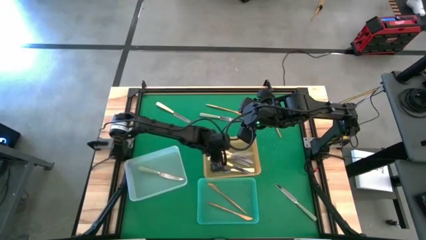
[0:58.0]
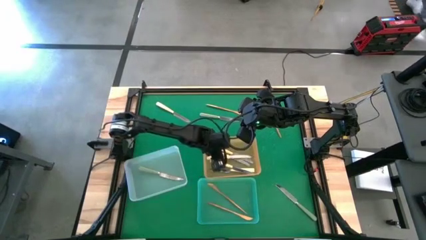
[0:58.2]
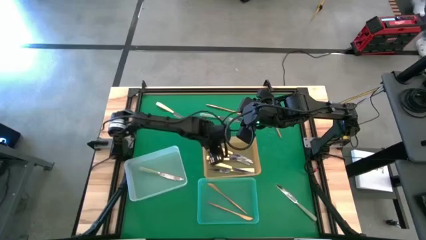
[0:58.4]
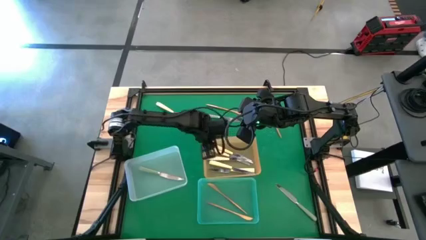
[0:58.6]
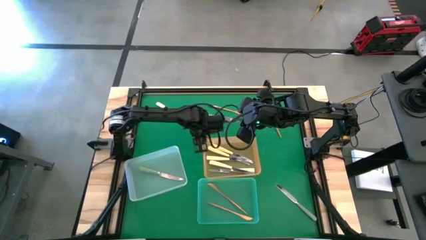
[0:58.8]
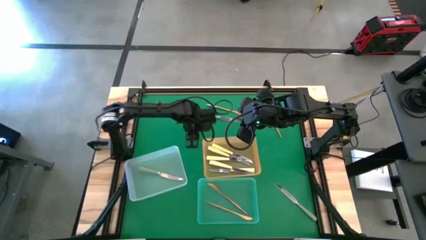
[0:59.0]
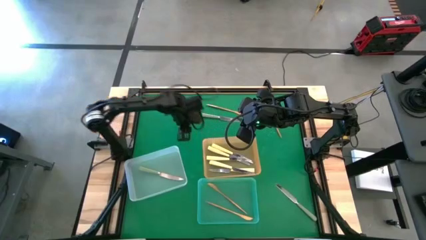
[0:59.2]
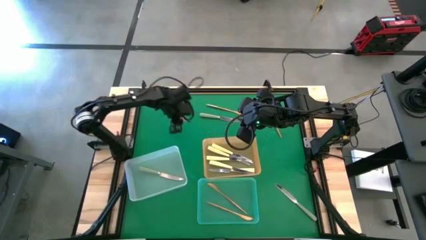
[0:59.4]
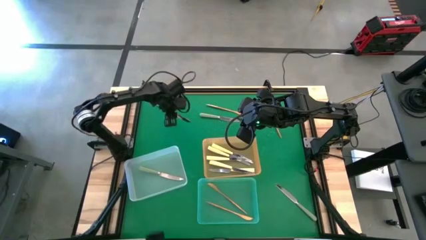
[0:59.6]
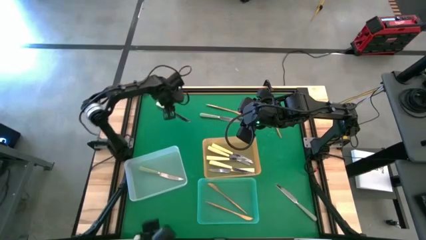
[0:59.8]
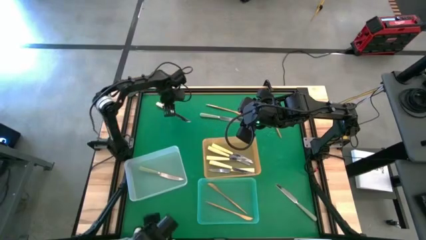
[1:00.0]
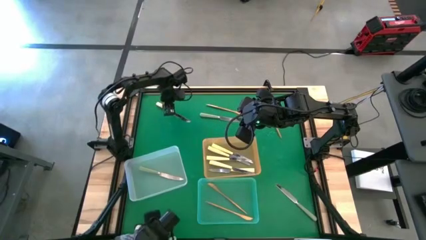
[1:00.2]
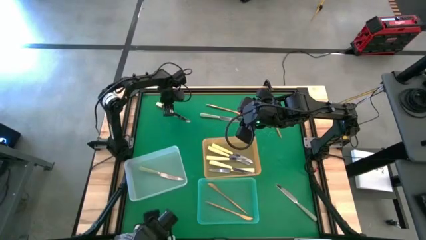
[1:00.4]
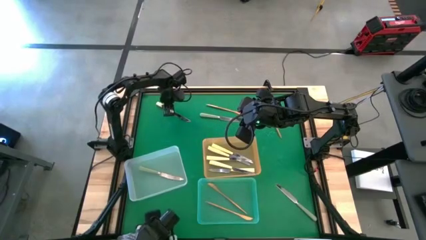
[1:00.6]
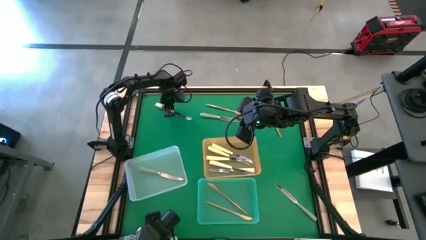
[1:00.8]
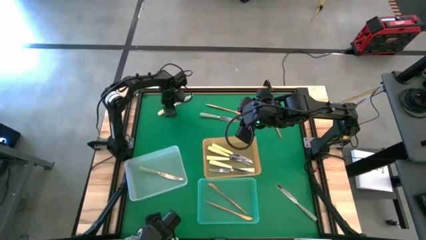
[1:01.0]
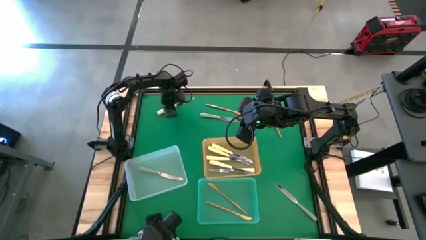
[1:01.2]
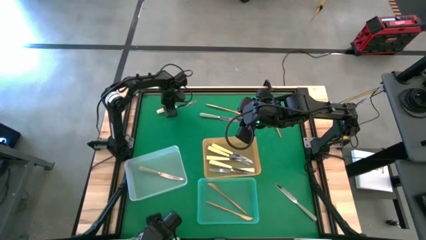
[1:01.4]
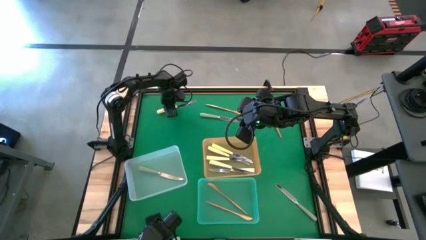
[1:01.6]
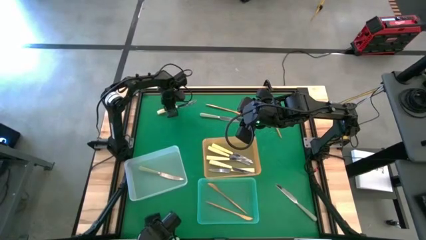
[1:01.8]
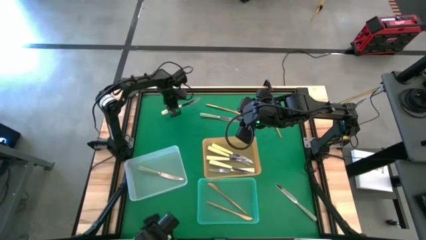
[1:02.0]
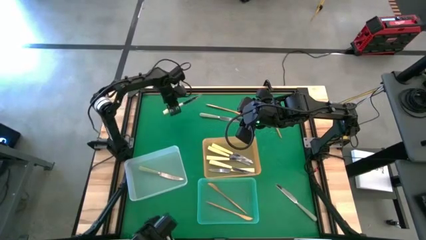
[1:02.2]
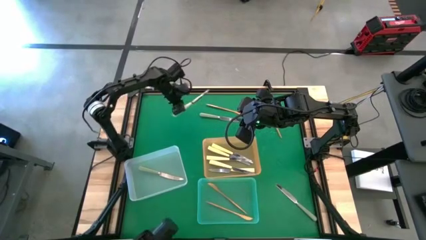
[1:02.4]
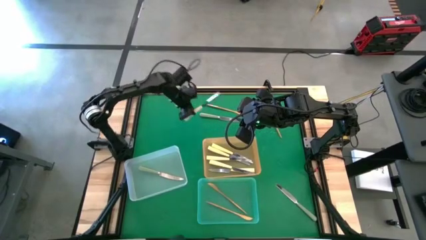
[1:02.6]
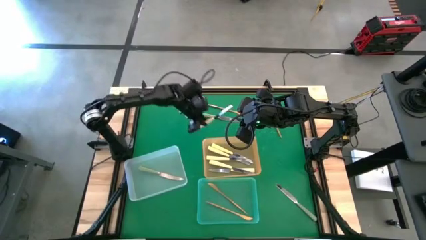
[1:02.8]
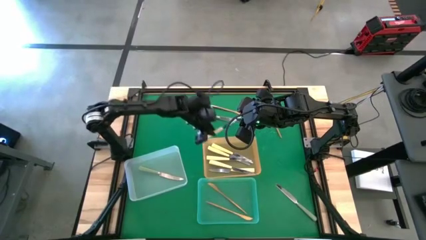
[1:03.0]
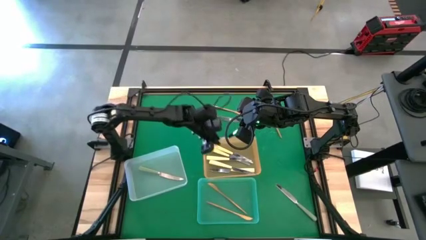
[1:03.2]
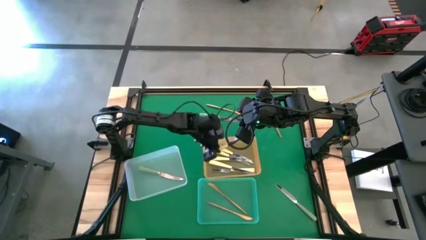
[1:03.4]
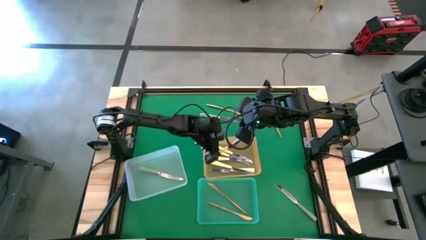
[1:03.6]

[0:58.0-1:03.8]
Task: Sort silverware by color (type)
Put the yellow table knife into the orange bin

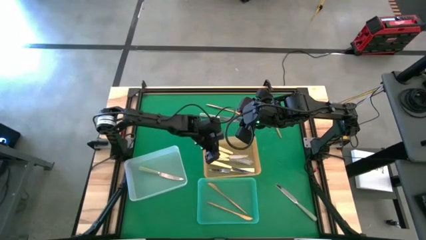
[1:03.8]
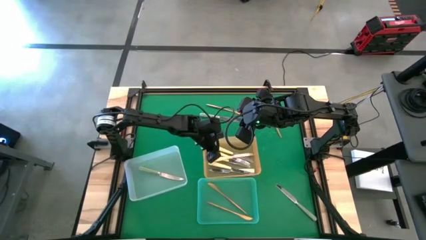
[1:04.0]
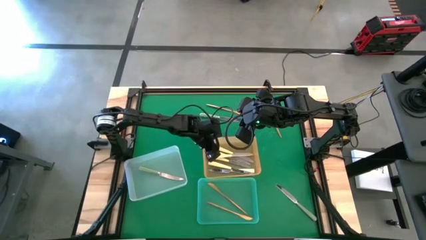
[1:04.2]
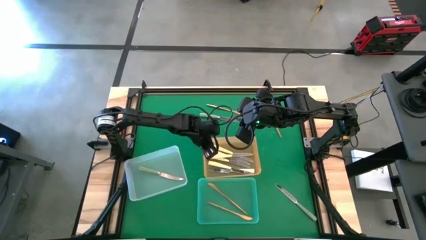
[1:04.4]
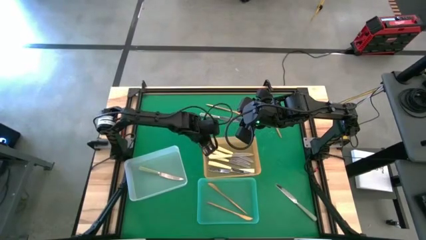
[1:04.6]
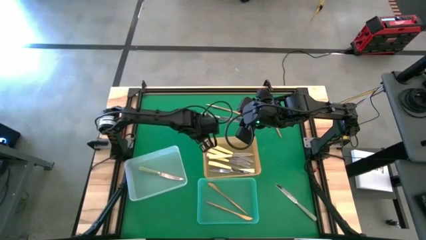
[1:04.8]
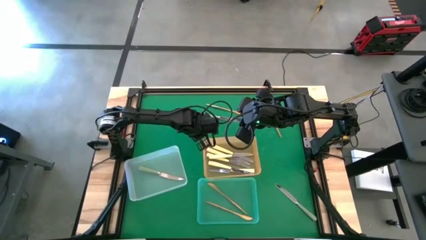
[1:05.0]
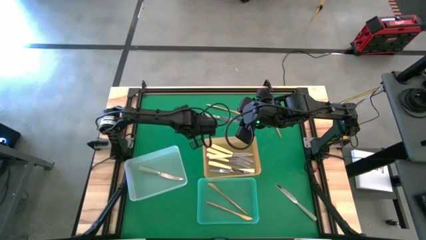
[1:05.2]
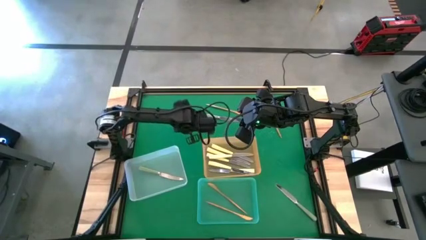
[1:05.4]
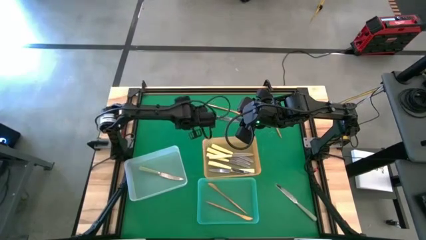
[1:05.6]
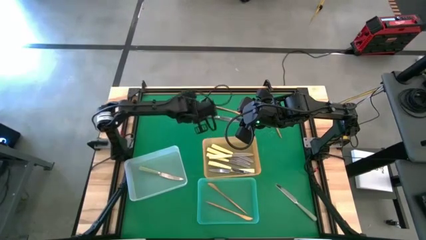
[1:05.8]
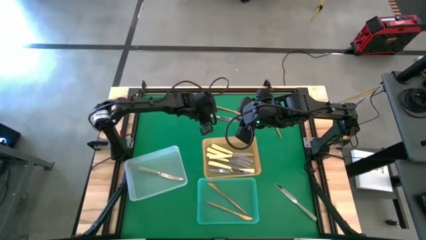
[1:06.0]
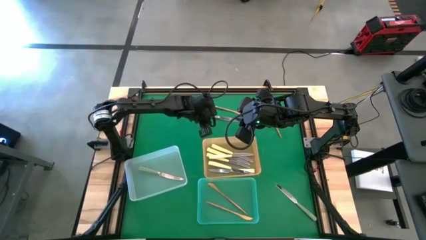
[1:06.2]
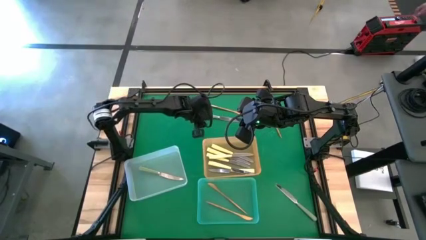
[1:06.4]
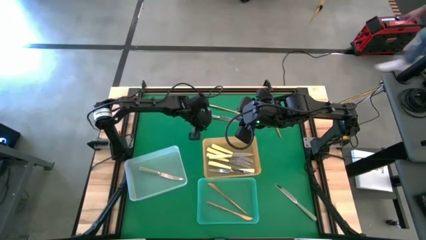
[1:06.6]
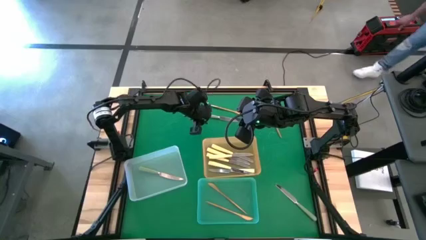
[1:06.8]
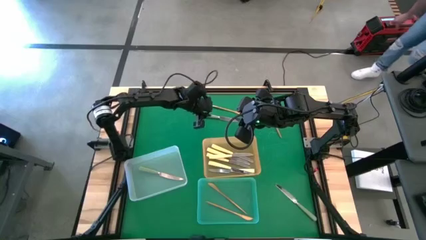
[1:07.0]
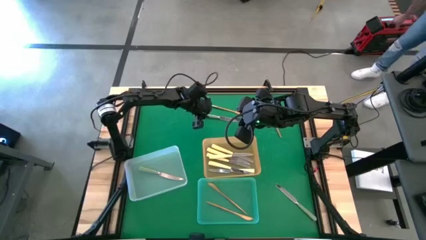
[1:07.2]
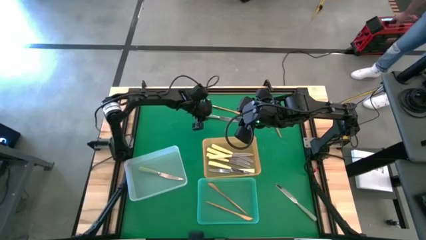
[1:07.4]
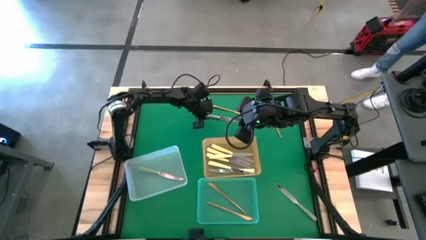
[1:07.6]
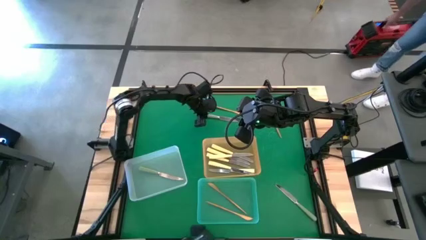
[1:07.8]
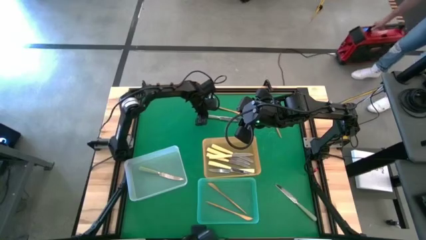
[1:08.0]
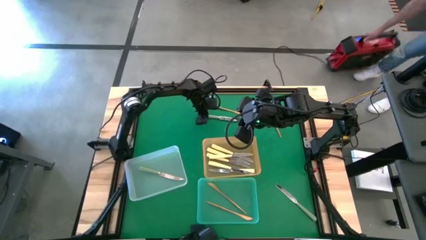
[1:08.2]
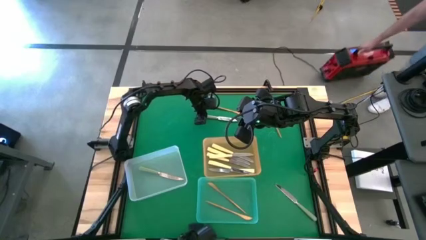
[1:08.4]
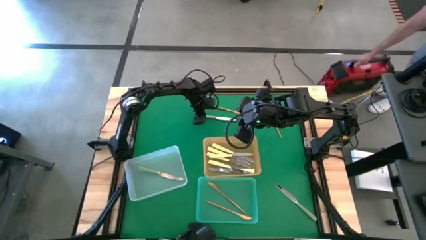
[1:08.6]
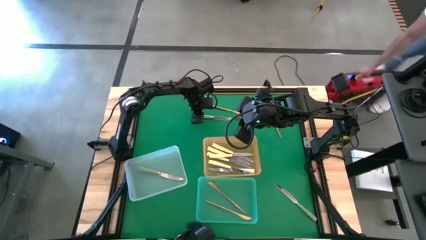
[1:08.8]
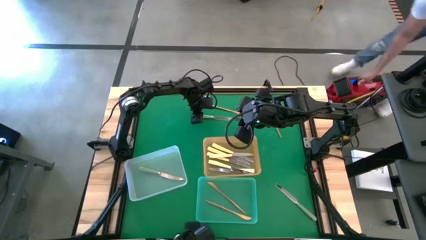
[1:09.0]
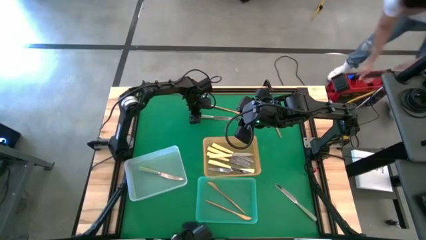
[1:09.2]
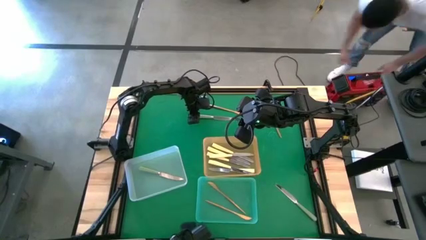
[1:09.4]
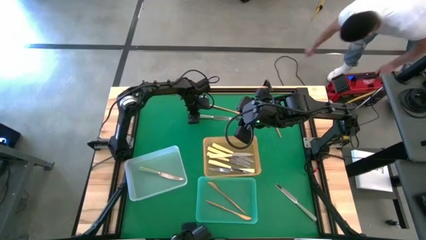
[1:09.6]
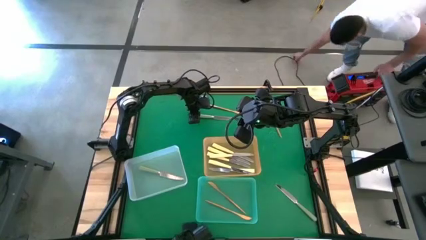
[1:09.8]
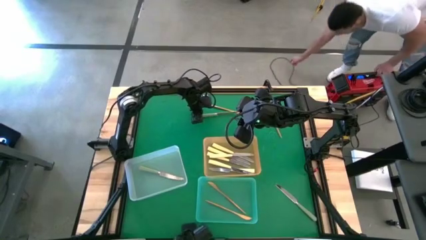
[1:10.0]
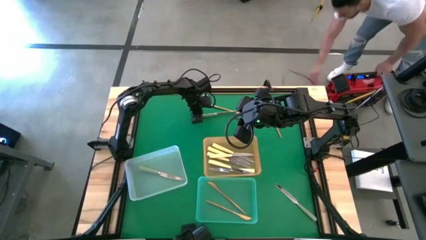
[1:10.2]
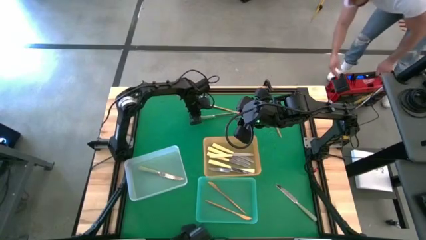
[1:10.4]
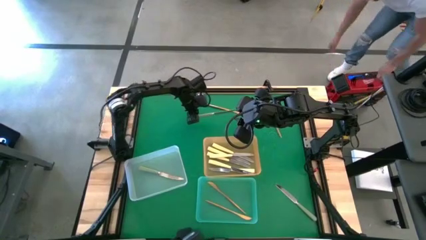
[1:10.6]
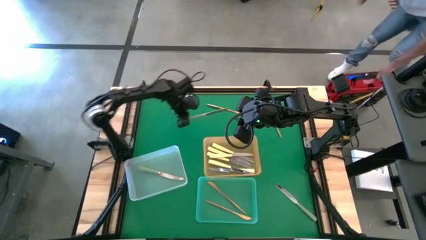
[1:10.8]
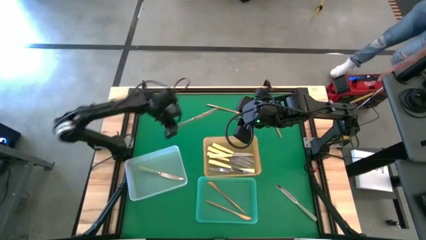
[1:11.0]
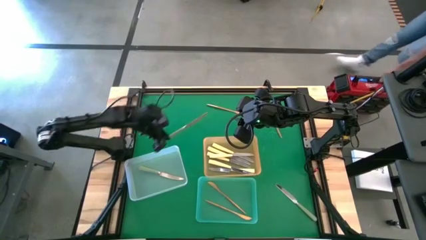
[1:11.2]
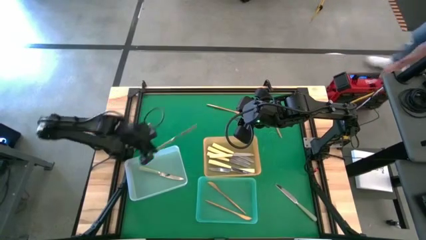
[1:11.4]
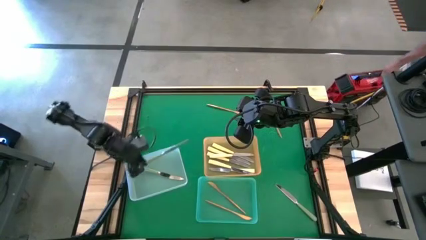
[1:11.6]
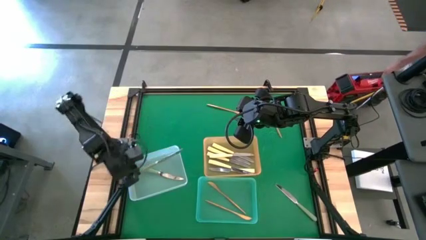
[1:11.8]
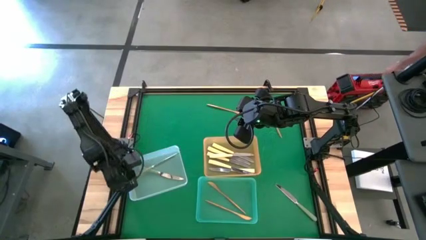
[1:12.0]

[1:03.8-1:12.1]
Put the green table knife into the white bin
